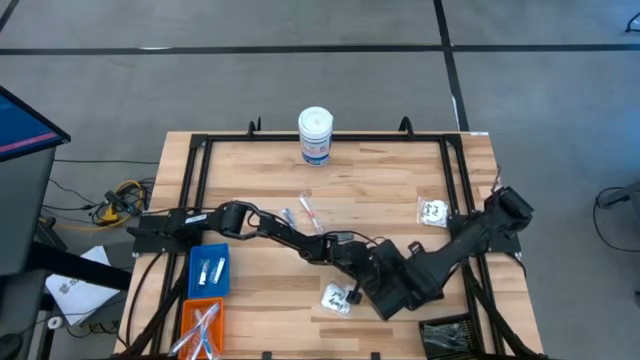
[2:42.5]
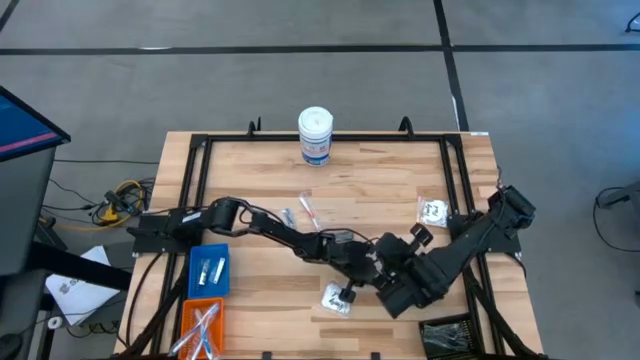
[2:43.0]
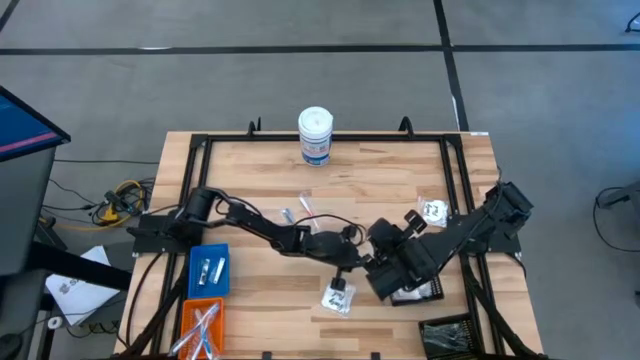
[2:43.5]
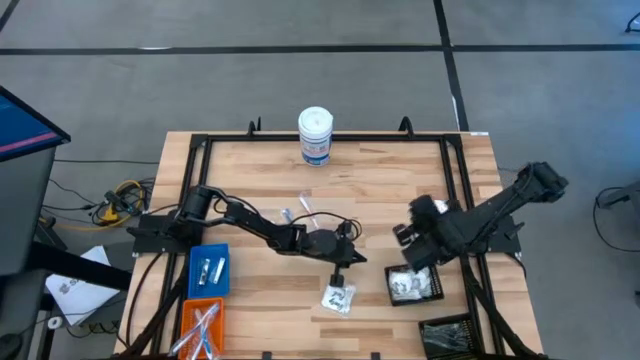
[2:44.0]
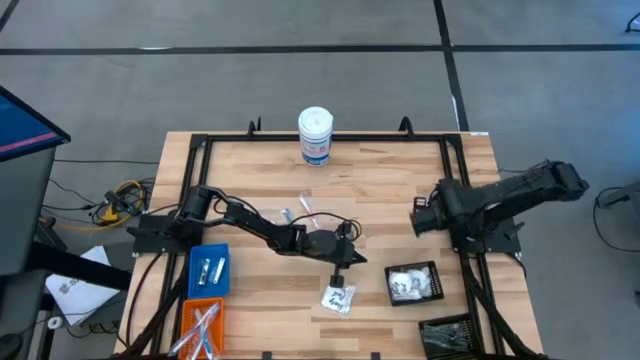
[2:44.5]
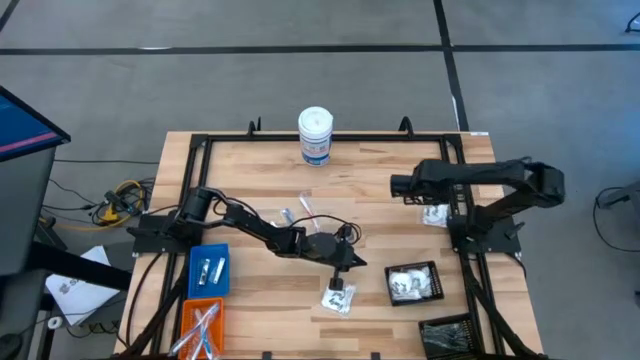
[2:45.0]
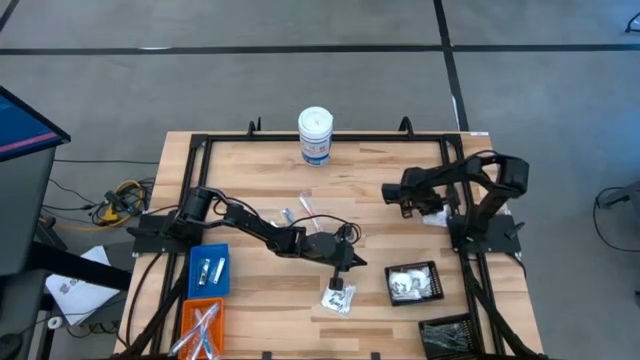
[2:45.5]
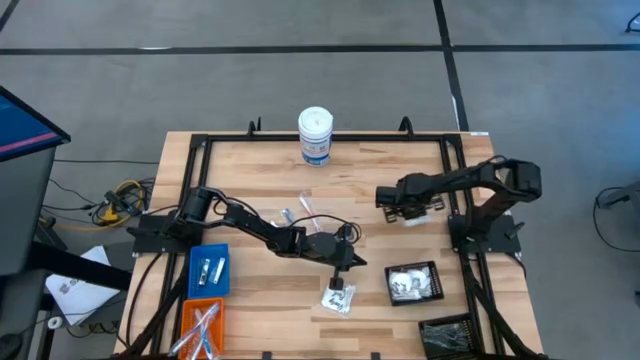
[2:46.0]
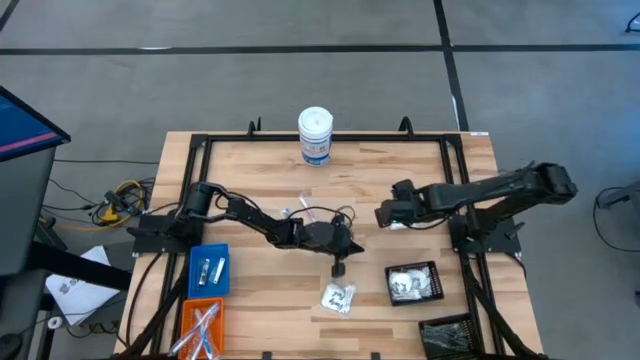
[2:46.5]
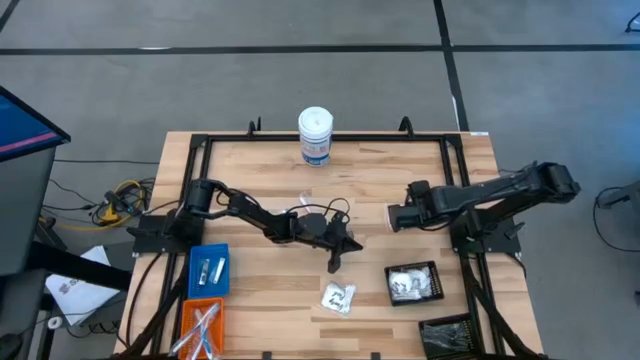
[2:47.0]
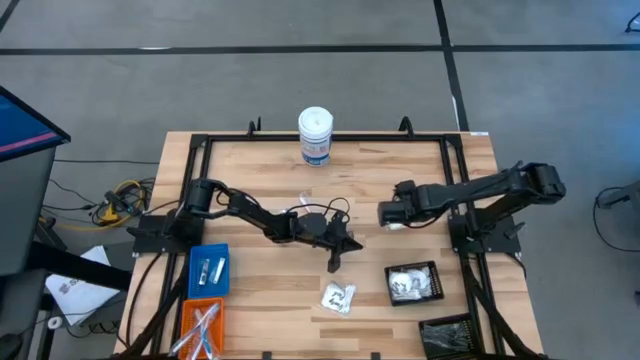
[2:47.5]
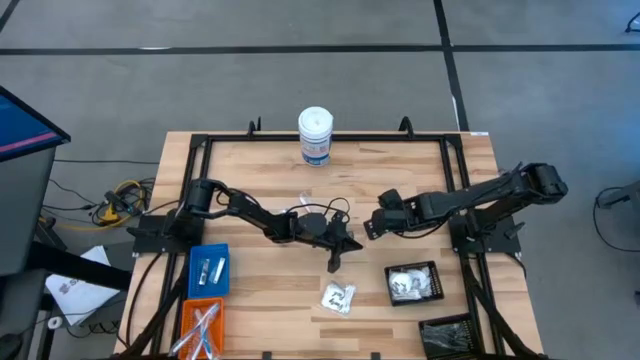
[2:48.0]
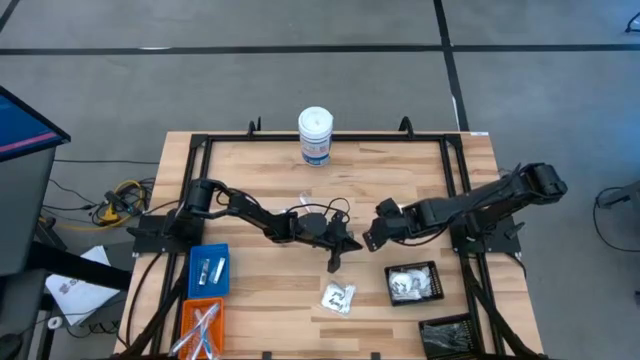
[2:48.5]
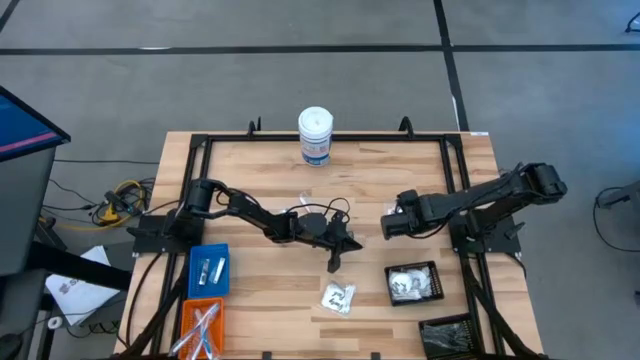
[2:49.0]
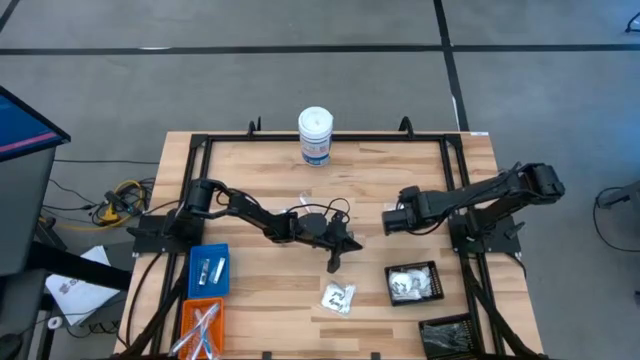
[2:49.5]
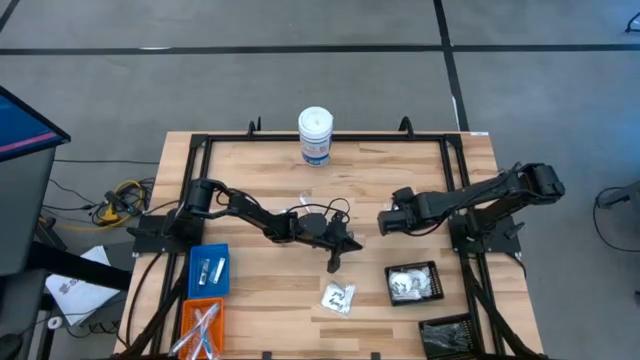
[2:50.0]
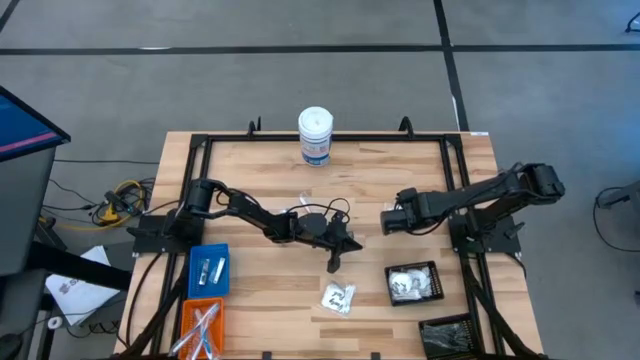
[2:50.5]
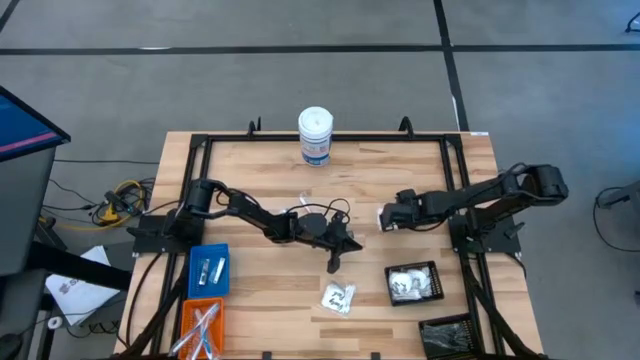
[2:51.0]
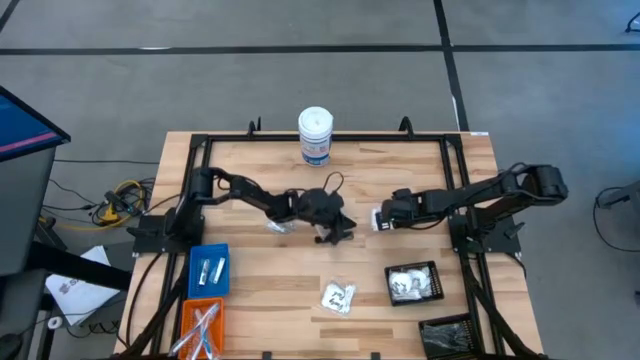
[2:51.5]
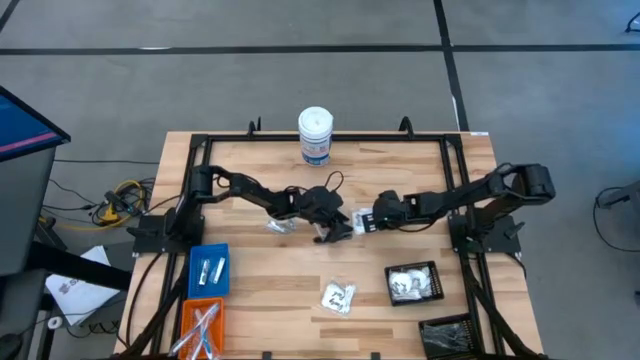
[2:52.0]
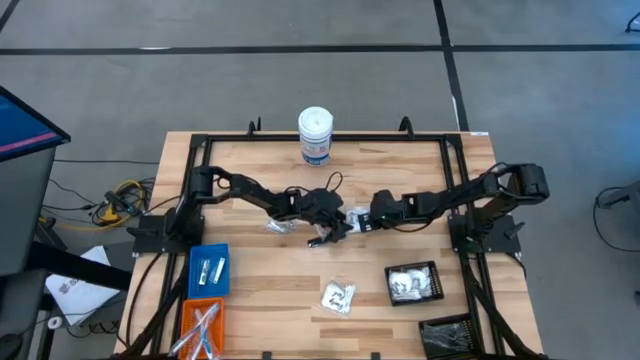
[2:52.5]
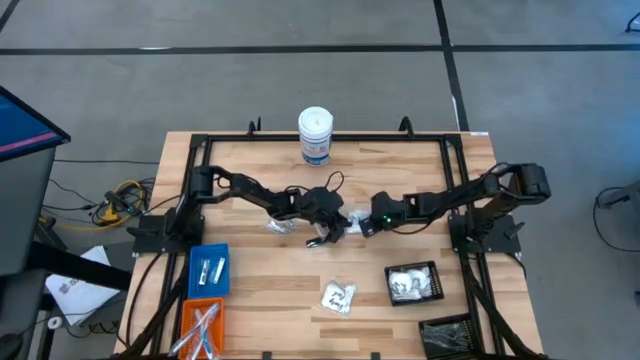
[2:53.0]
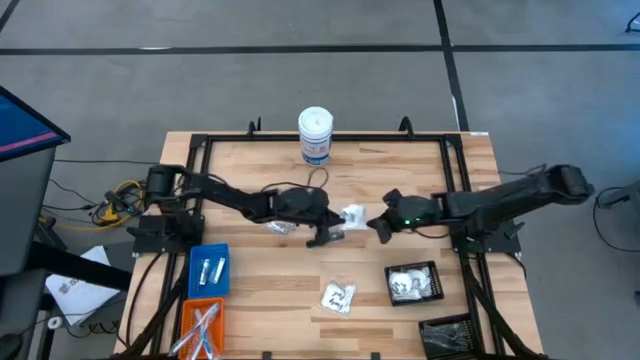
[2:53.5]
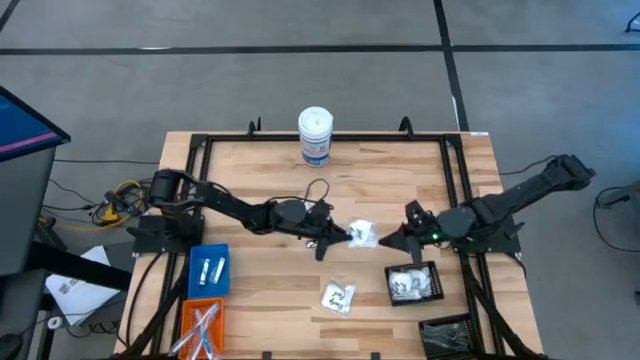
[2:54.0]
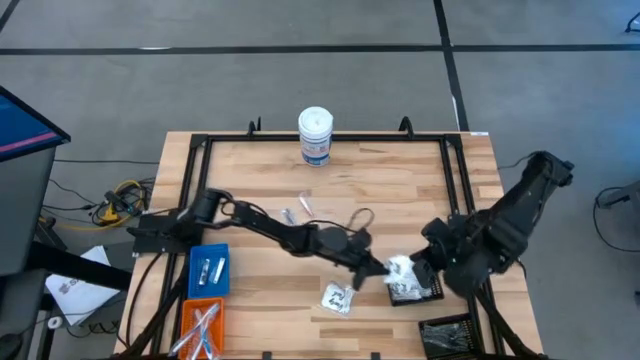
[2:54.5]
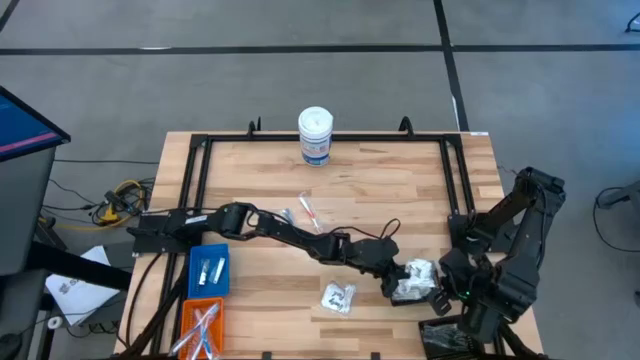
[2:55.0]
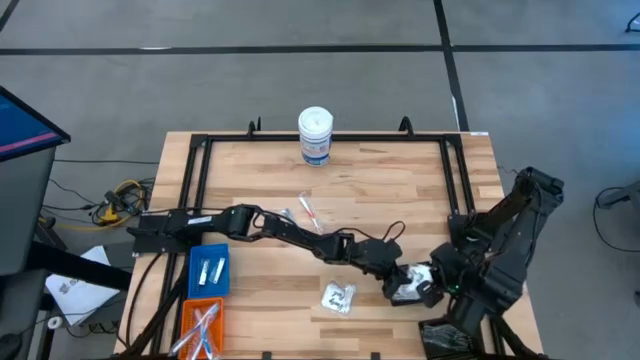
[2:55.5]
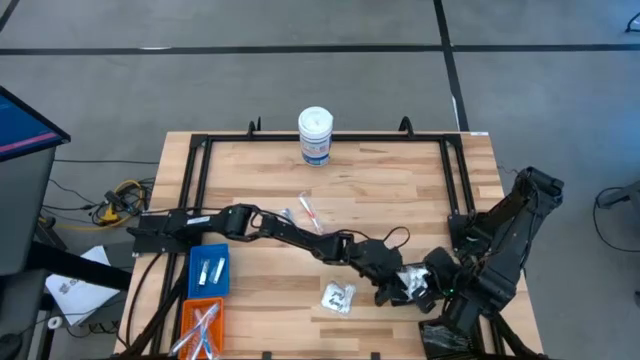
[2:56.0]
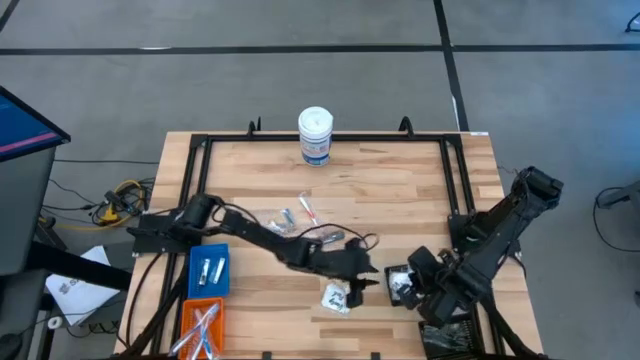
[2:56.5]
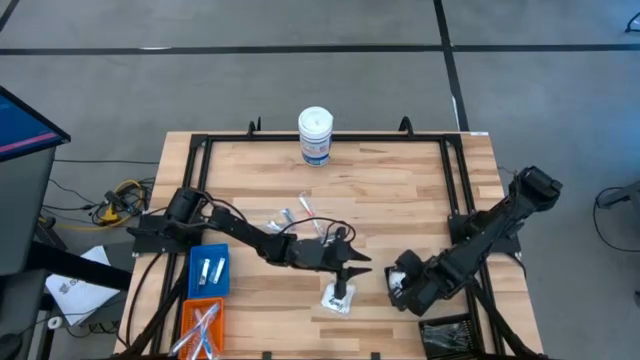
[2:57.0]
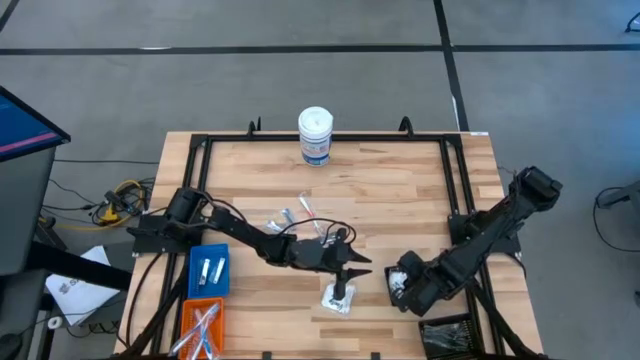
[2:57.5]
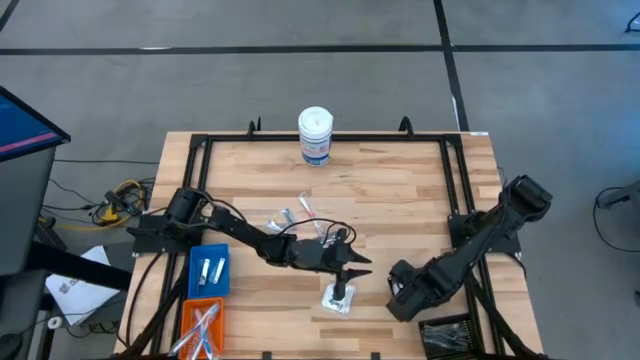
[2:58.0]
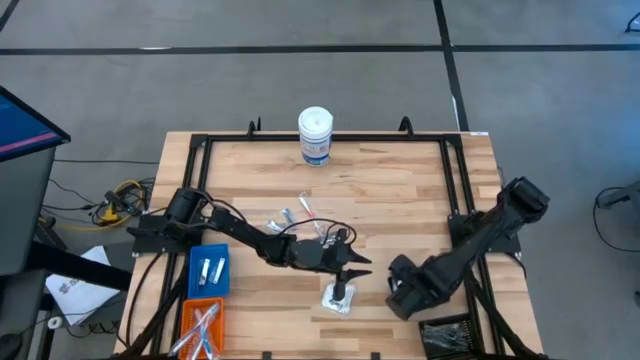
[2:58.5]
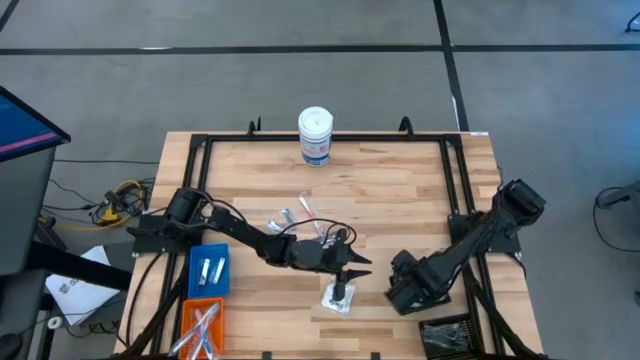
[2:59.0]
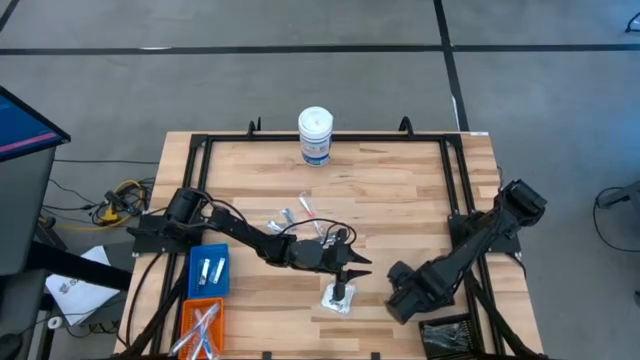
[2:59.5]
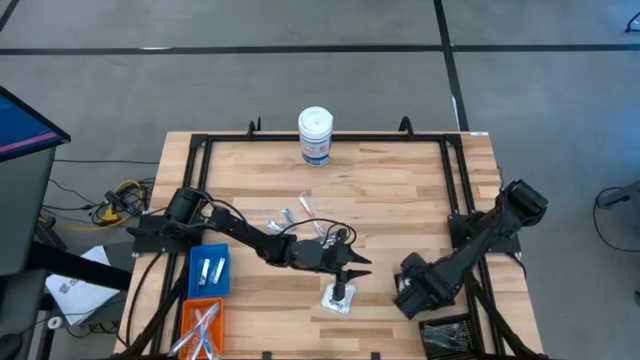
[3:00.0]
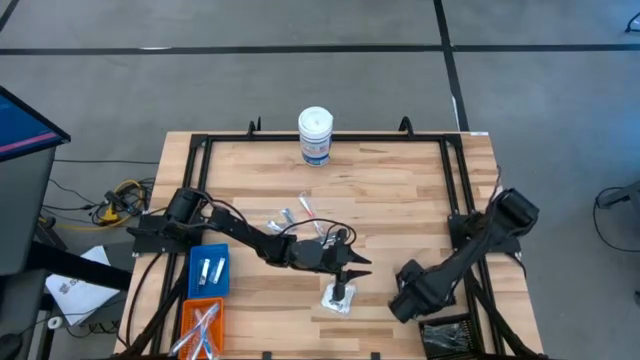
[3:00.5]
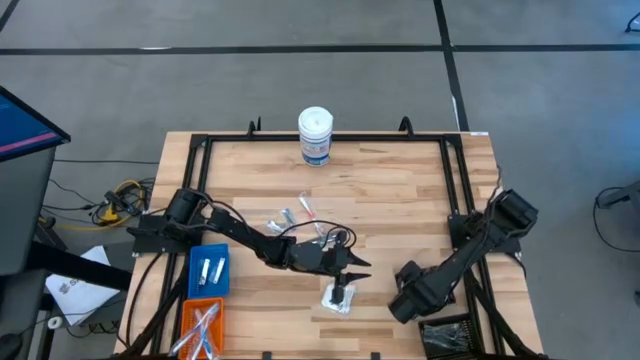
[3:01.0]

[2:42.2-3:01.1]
Task: Pick & Place Travel size toiletries
Put the white cotton swab pack into the top black bin

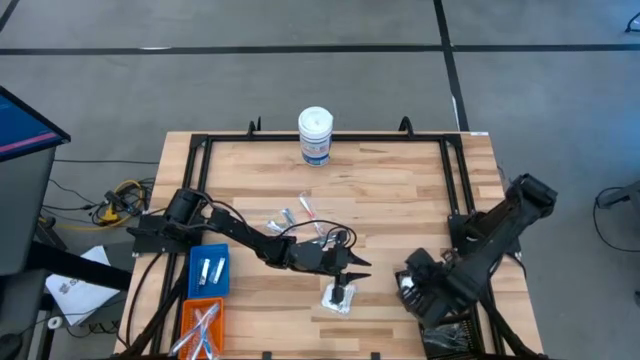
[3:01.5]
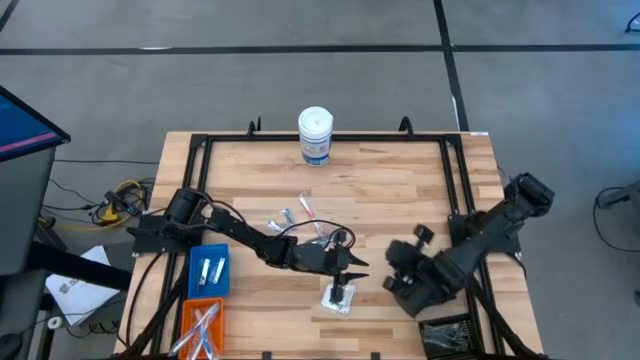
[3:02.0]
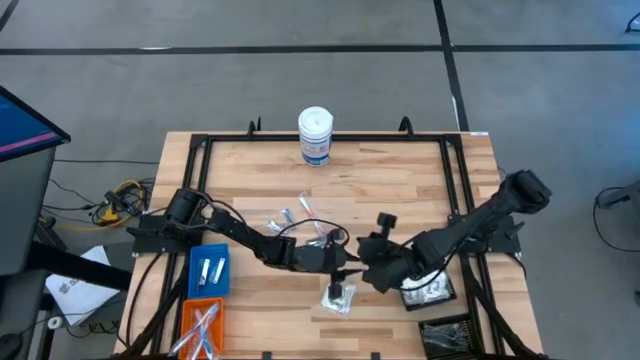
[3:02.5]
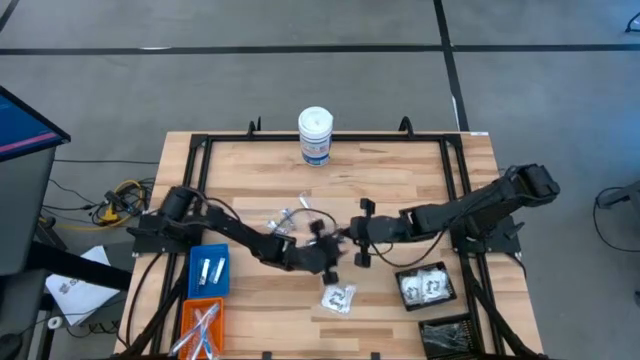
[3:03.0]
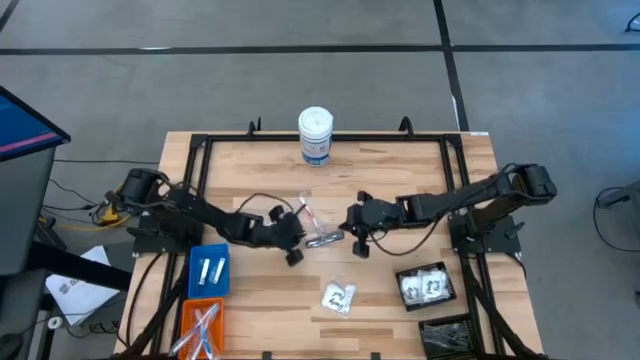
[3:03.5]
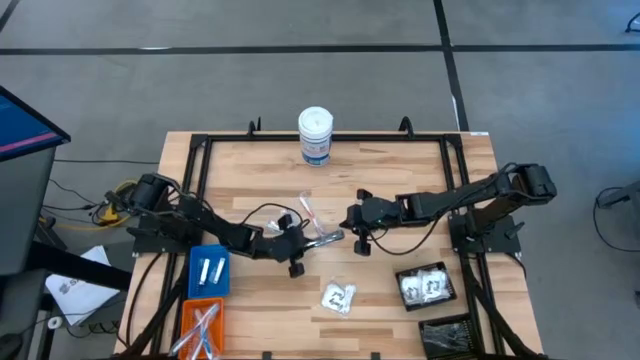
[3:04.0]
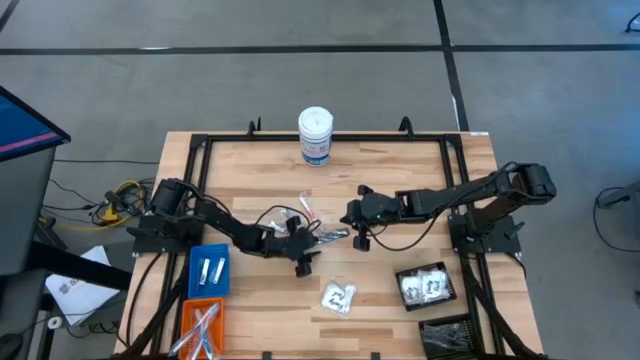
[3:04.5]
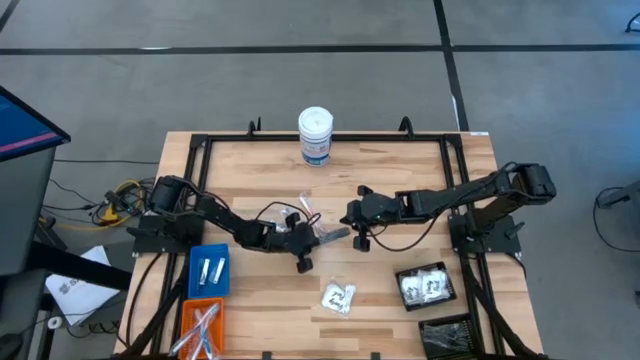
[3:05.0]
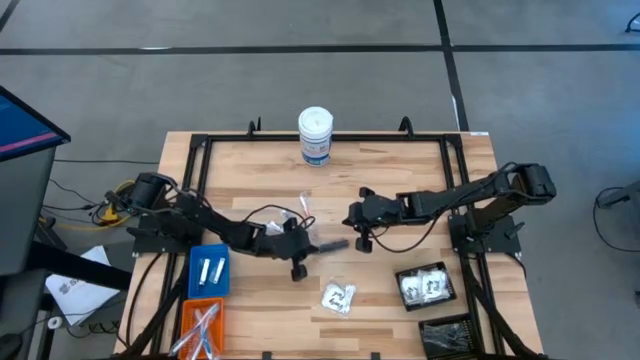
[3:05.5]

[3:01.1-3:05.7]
Put the black comb into the bottom black bin
